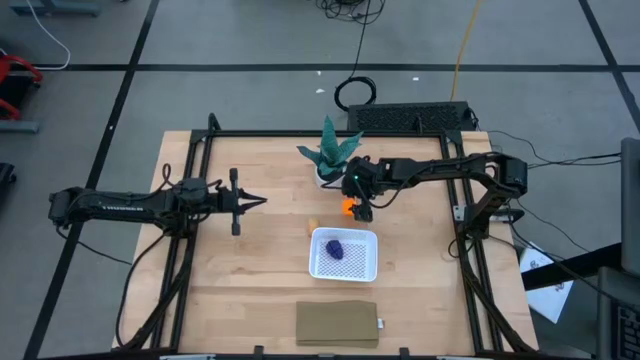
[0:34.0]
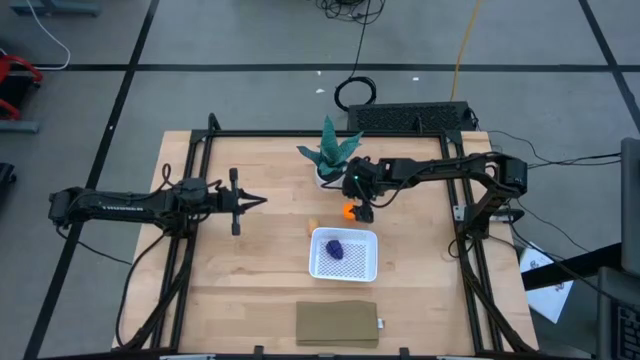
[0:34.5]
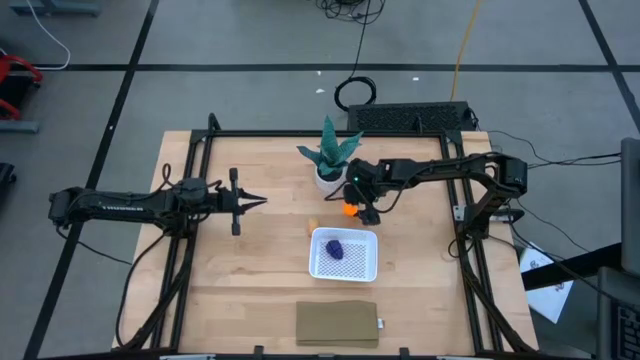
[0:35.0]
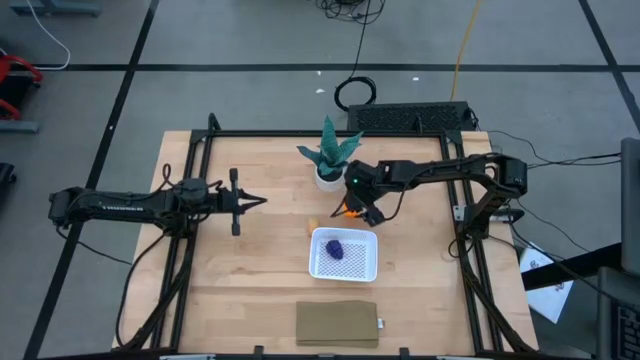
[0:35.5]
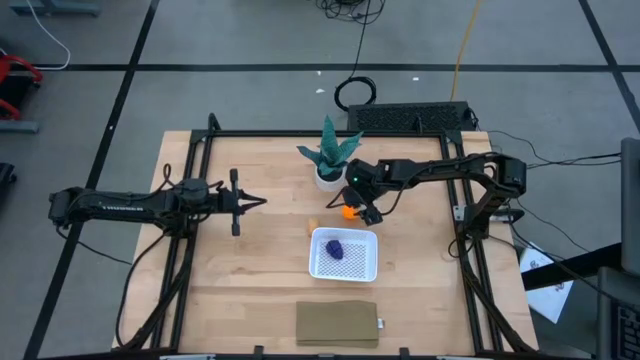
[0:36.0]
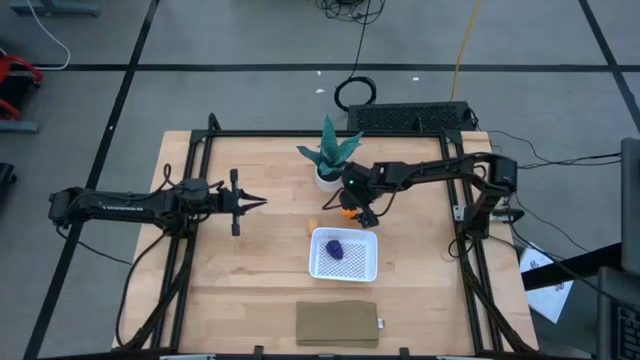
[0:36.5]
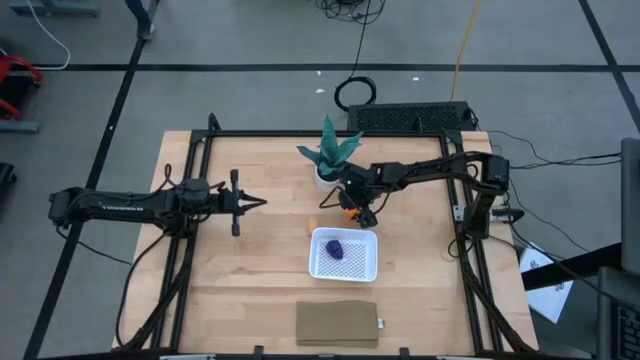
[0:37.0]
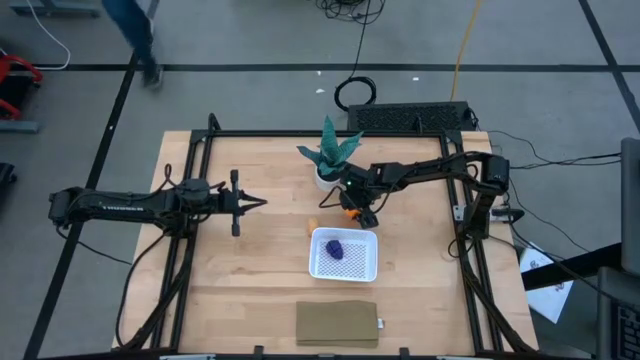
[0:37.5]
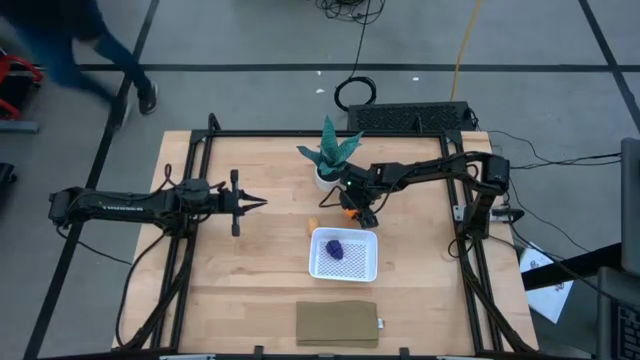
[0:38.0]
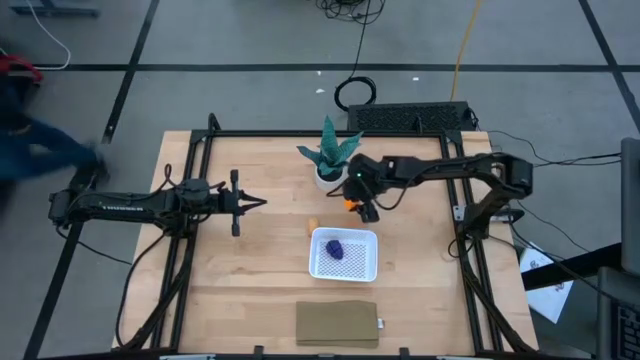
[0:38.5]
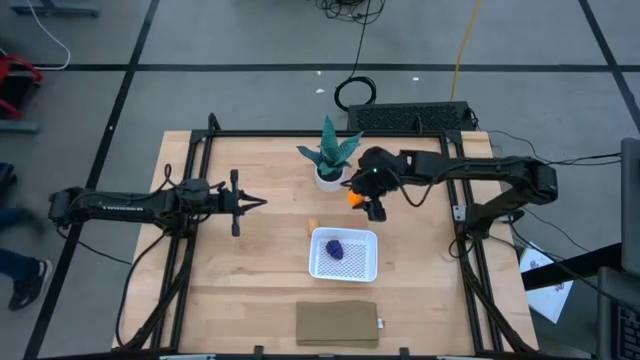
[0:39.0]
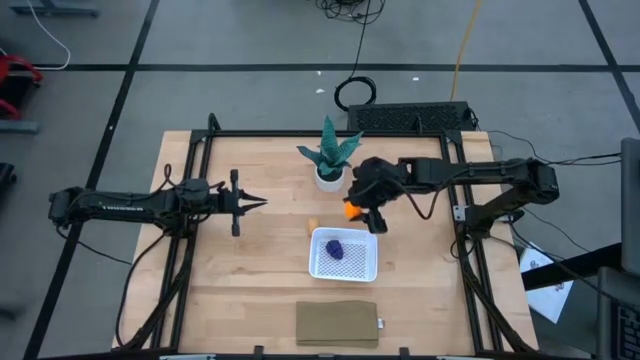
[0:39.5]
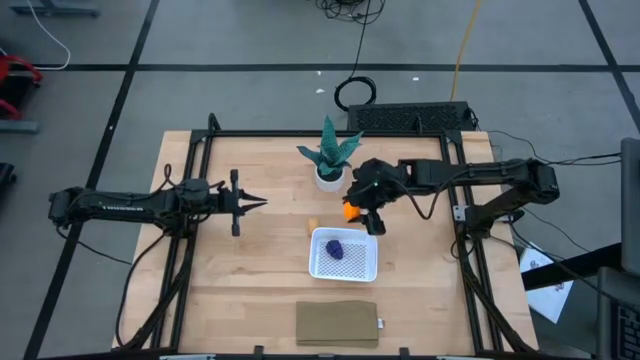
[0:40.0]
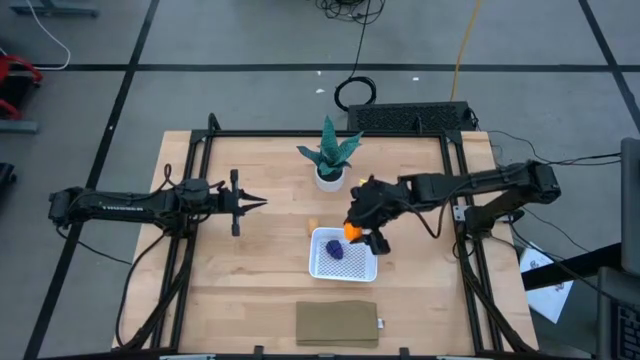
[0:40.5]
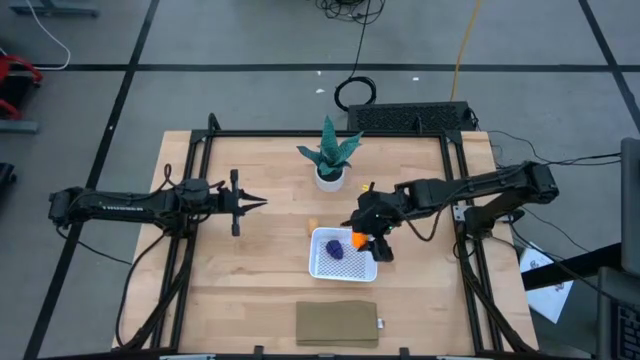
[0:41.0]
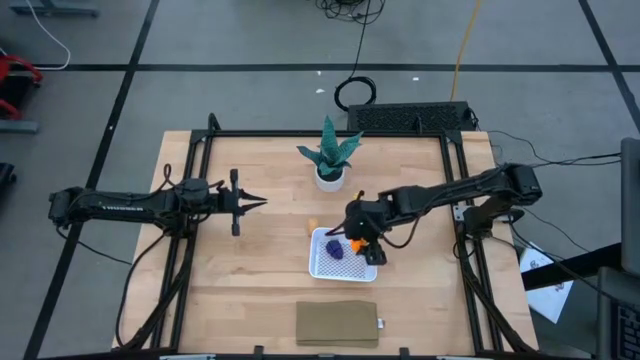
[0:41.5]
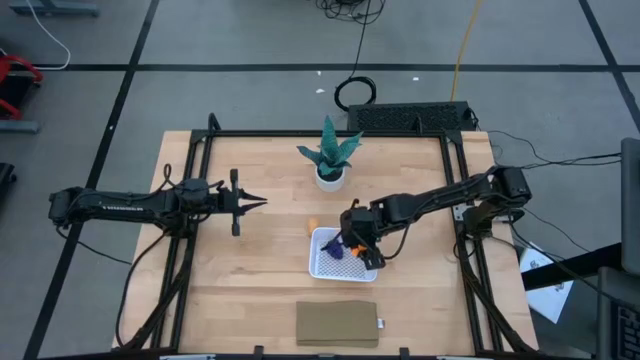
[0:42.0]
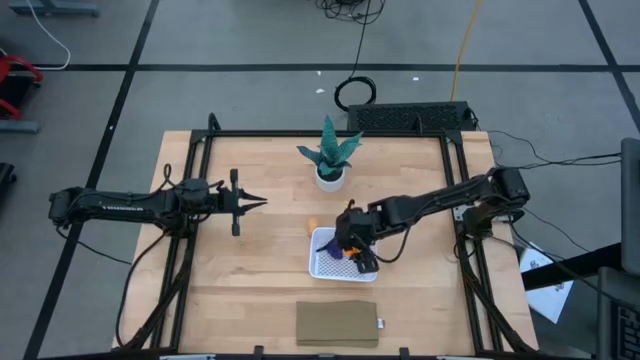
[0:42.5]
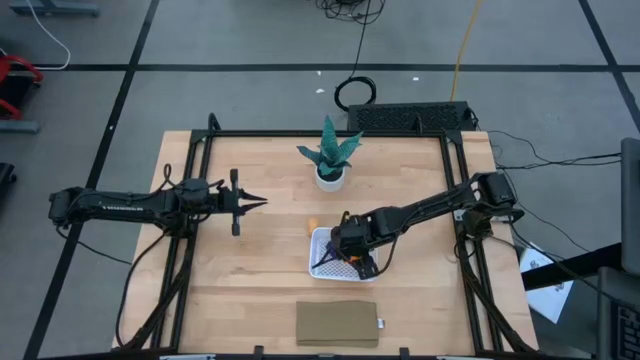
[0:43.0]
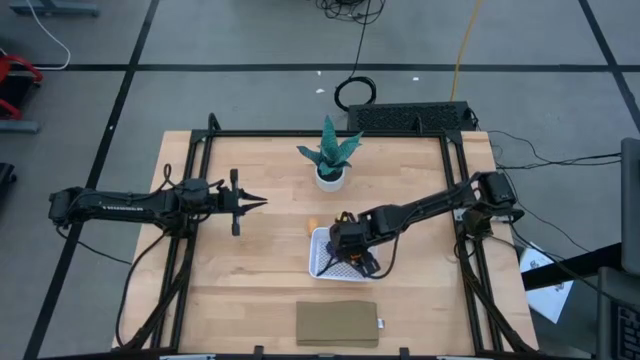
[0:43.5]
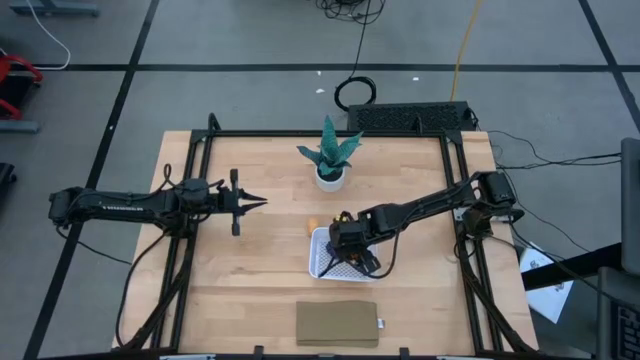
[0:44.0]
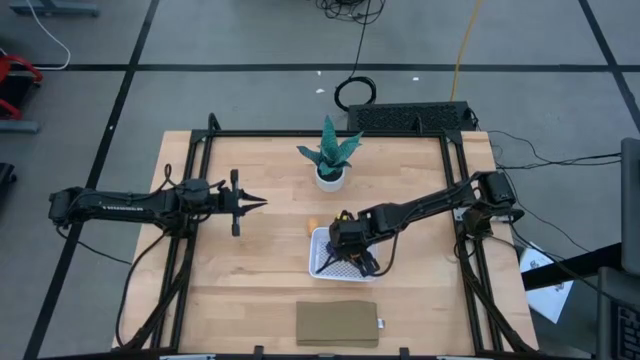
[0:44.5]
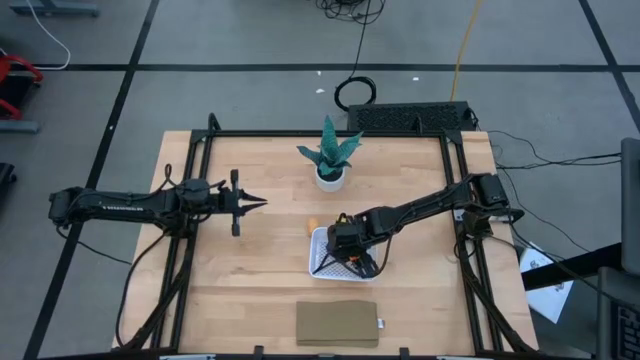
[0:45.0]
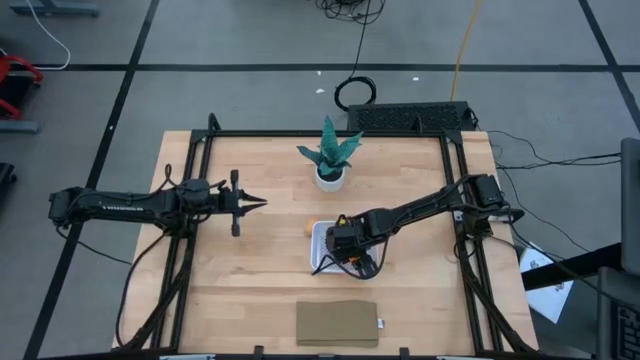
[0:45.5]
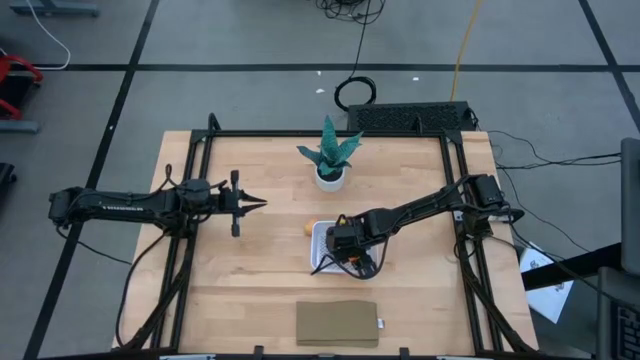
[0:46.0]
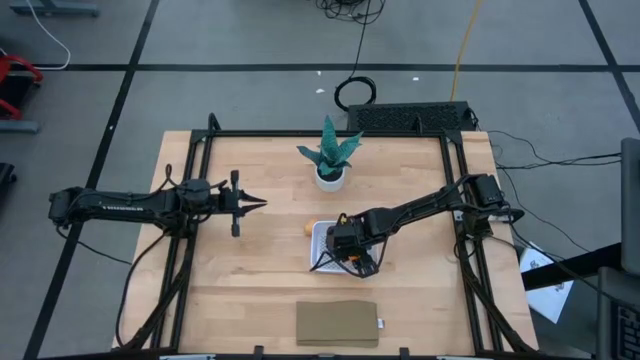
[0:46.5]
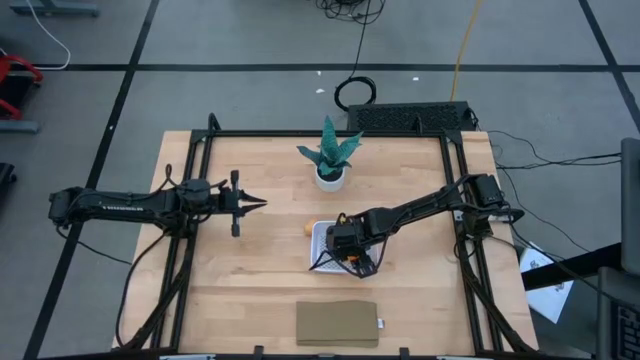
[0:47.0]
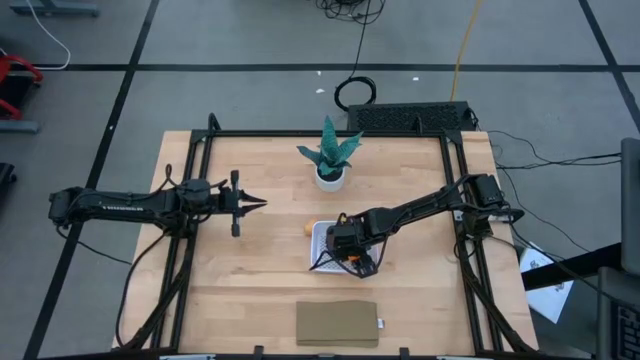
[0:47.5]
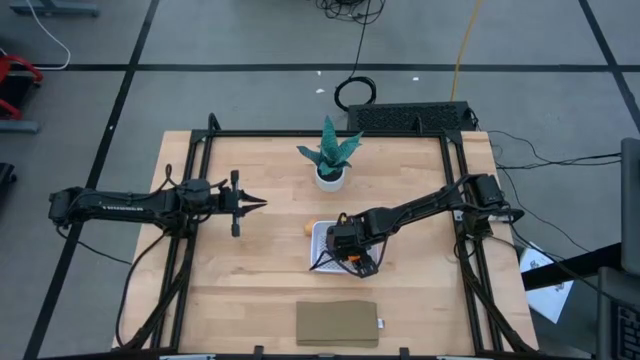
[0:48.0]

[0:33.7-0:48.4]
Task: Pick and placing Produce into tupperware
Put the orange into the white bin
